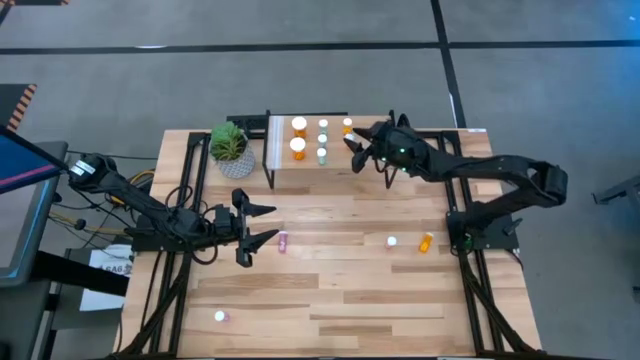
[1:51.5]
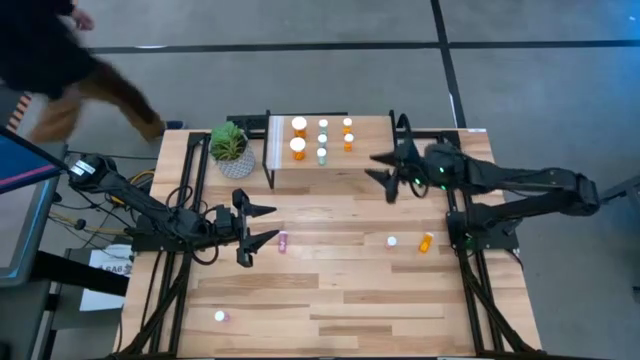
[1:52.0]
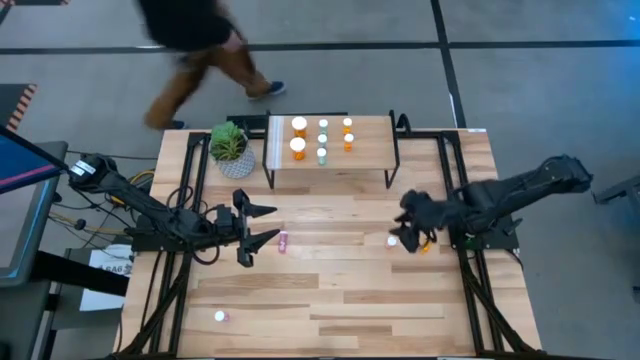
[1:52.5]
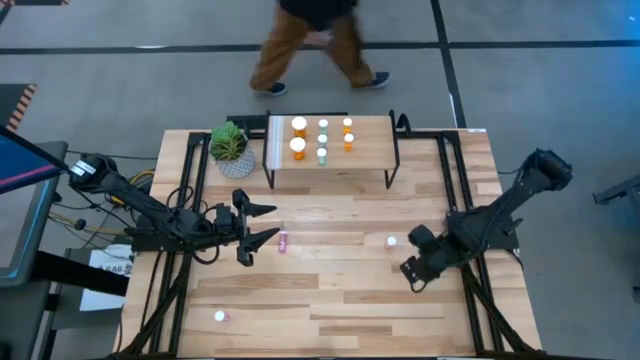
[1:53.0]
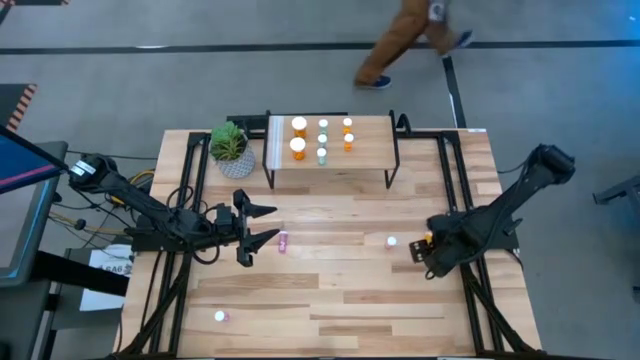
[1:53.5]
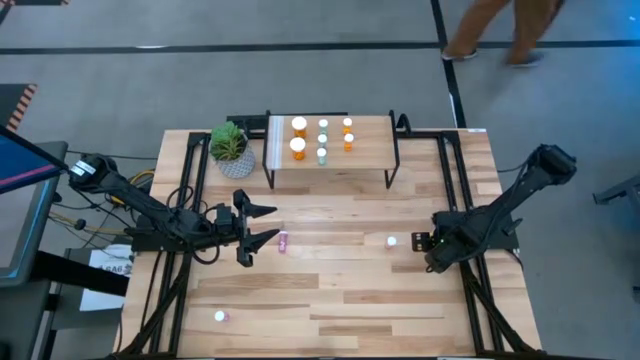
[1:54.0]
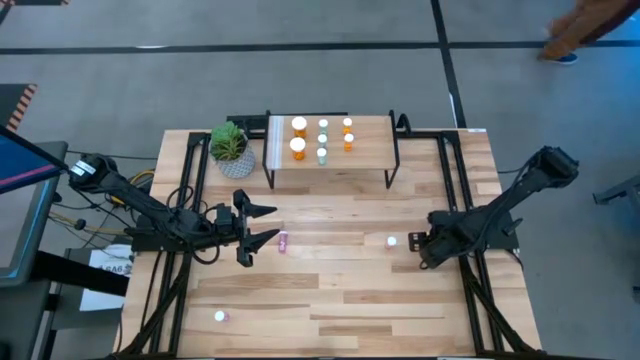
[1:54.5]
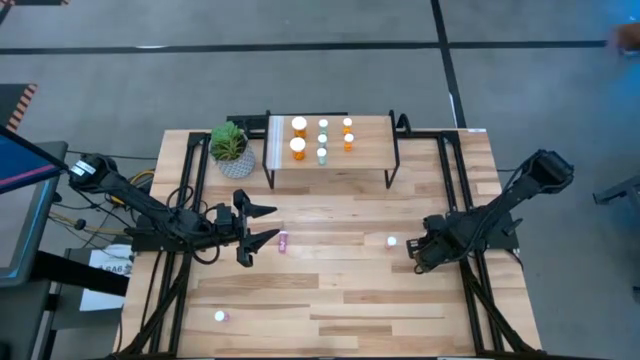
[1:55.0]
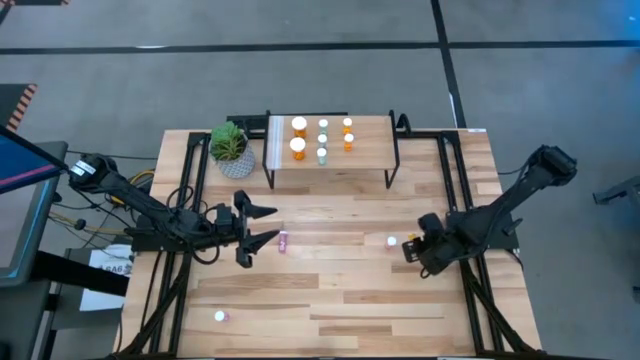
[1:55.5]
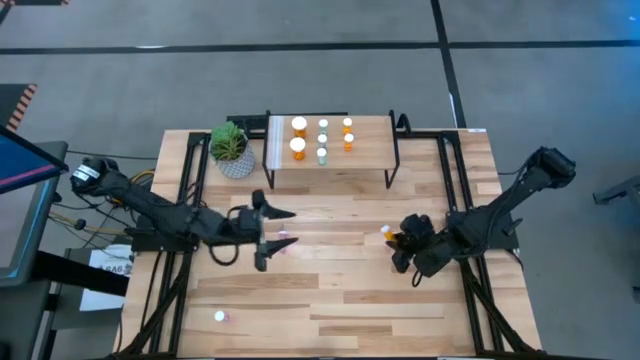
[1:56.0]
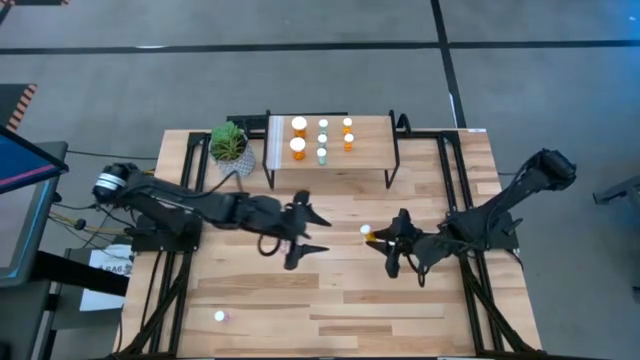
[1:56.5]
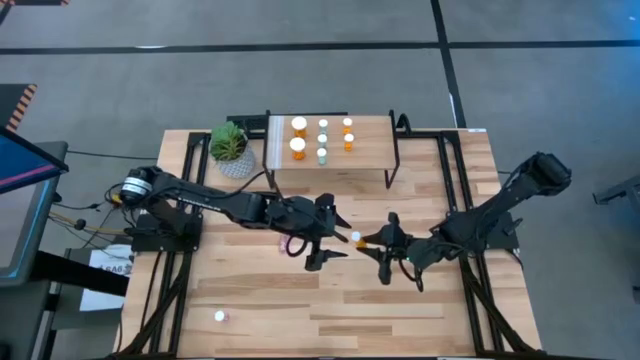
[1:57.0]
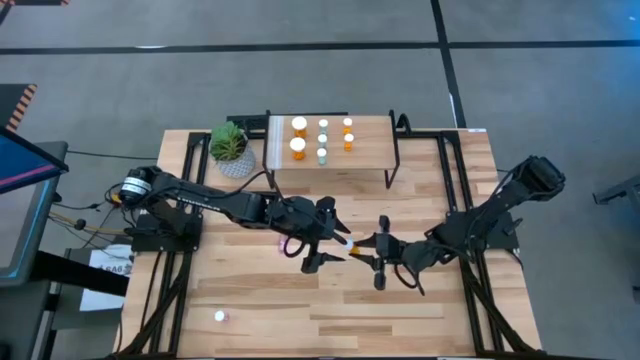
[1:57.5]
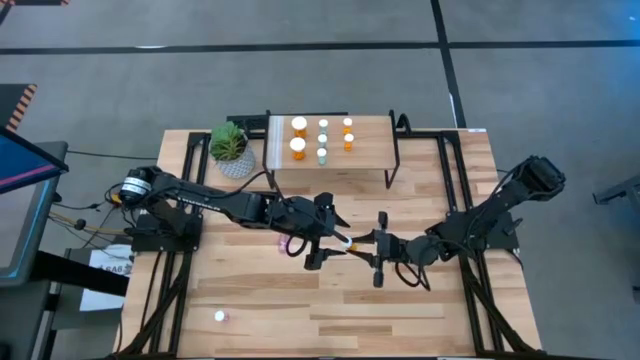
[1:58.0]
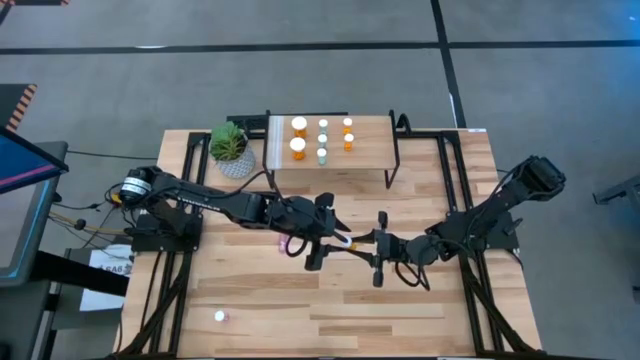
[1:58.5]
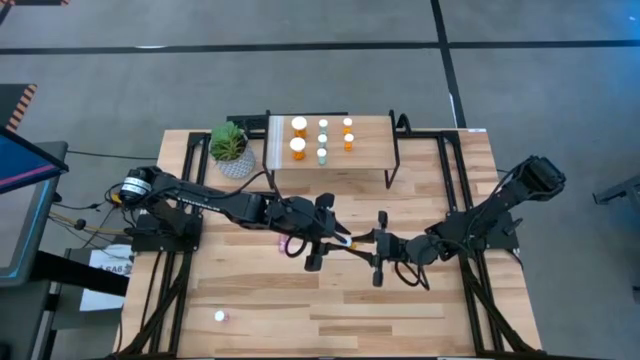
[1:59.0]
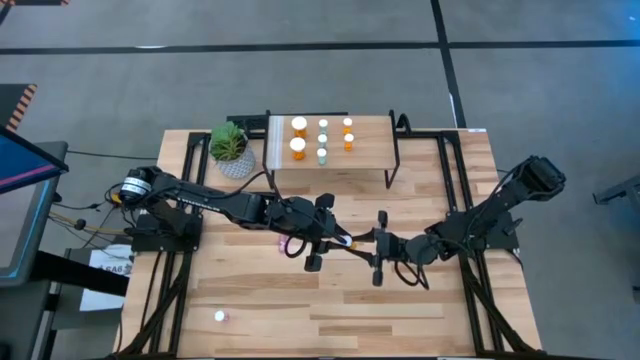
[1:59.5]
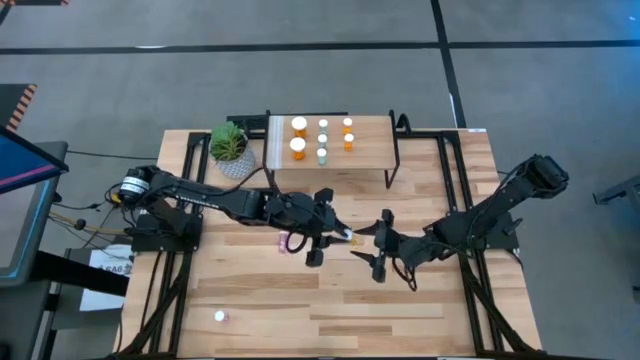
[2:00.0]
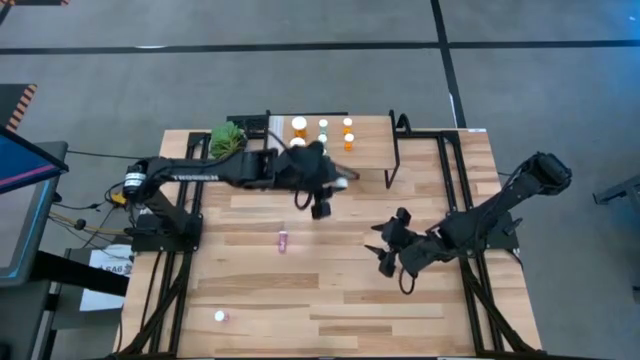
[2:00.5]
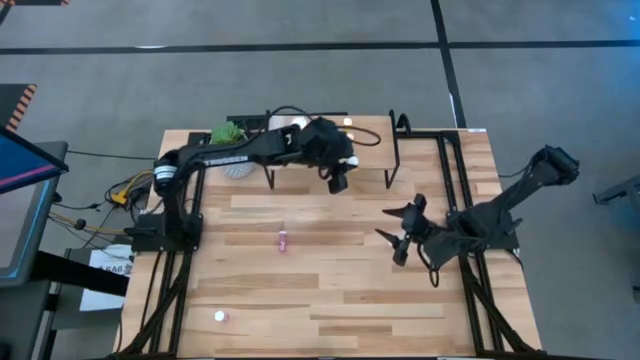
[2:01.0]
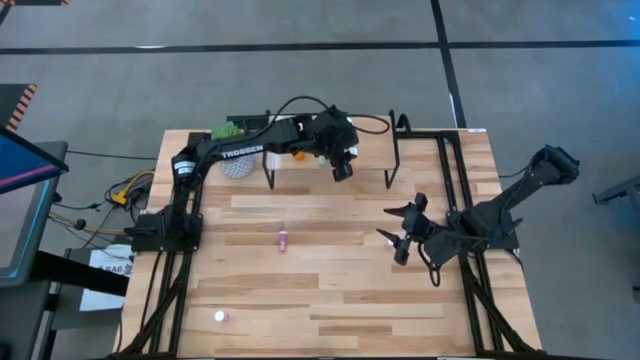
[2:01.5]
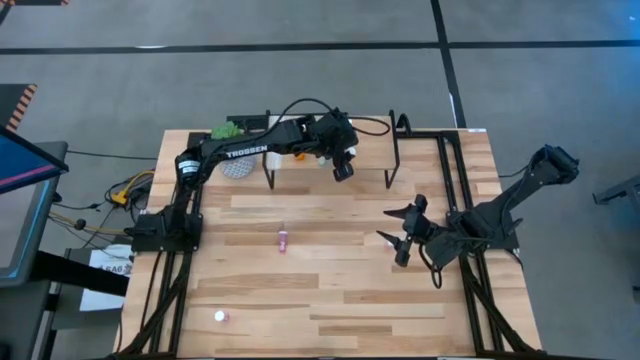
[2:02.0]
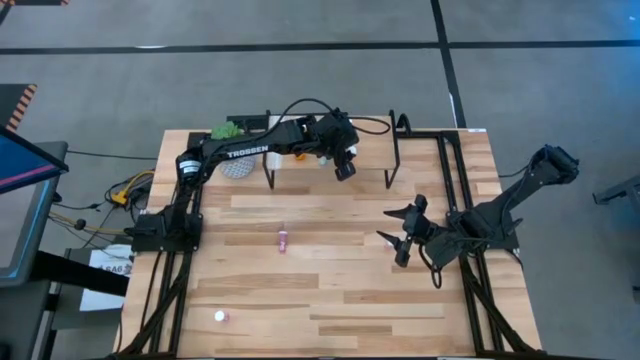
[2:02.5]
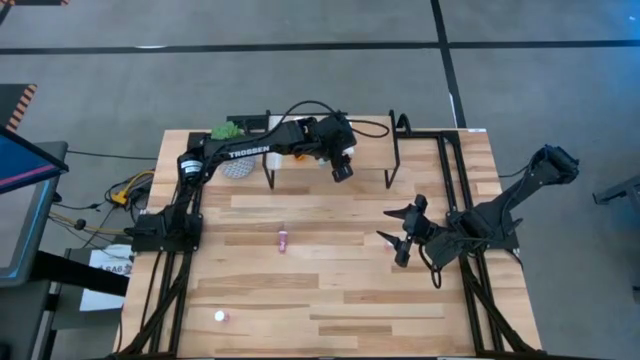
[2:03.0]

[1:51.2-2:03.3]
Task: Pick and place medicine bottles onto shelf by color
Put the small orange pill bottle on the shelf aligned with the other small orange pill bottles

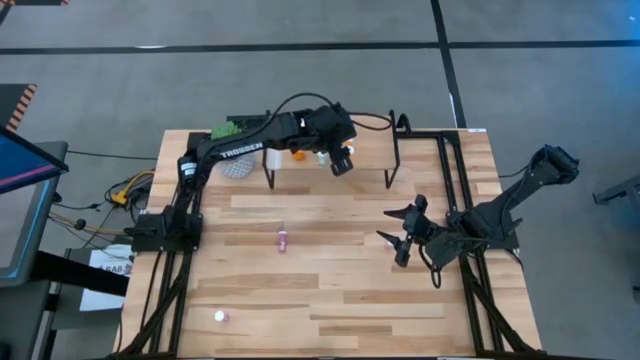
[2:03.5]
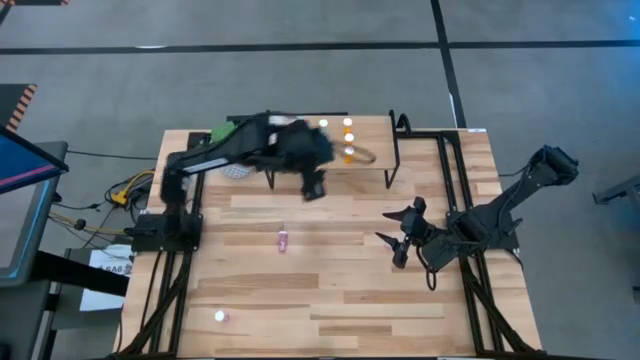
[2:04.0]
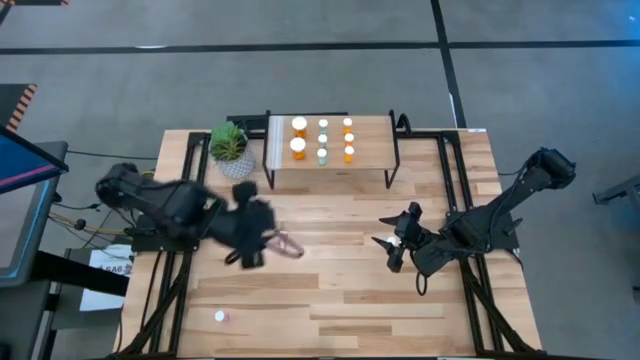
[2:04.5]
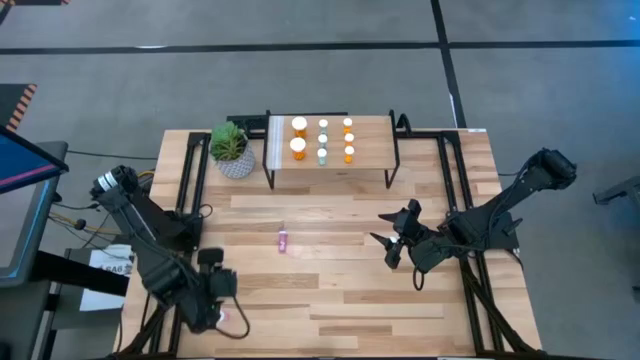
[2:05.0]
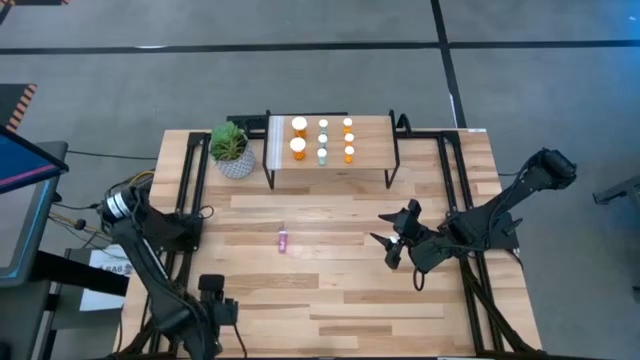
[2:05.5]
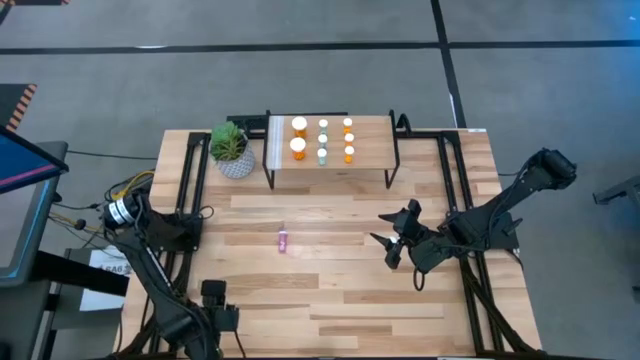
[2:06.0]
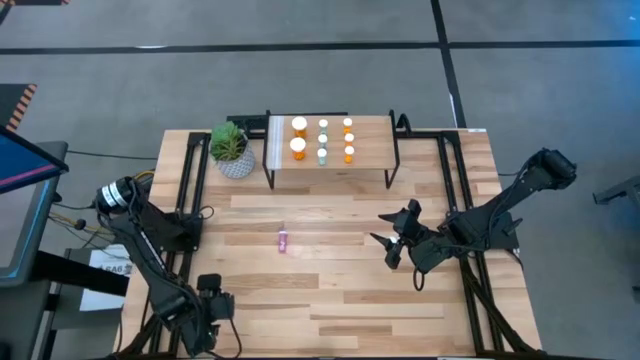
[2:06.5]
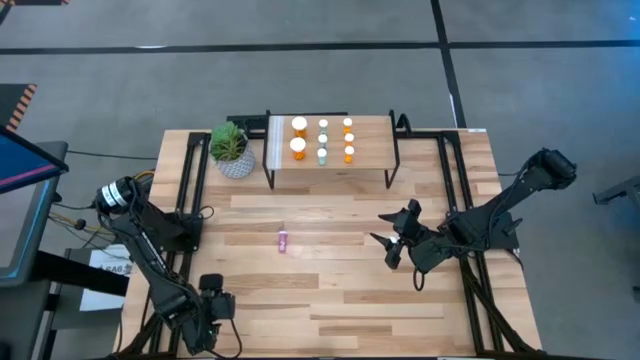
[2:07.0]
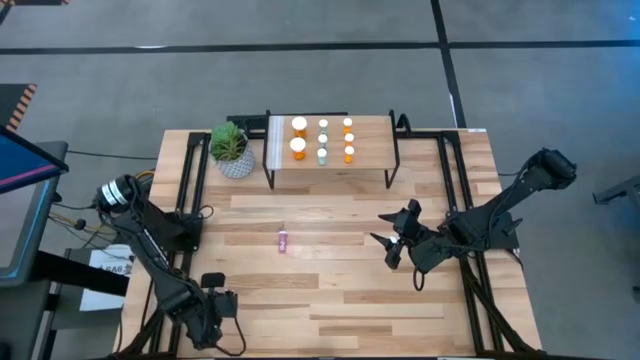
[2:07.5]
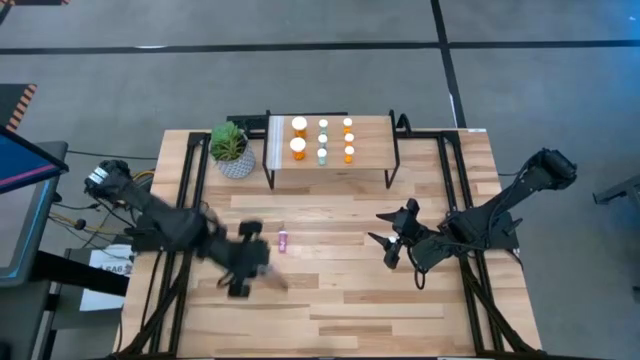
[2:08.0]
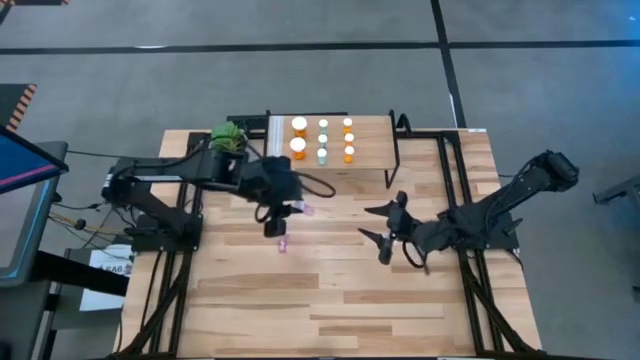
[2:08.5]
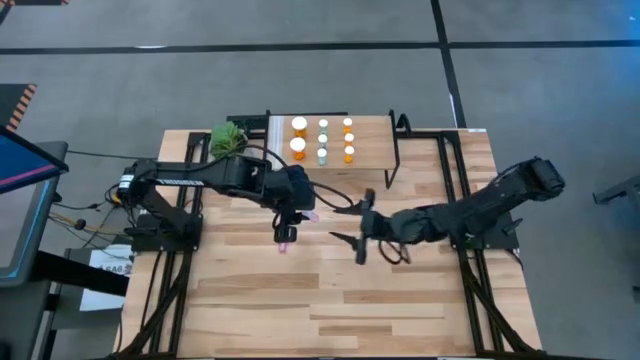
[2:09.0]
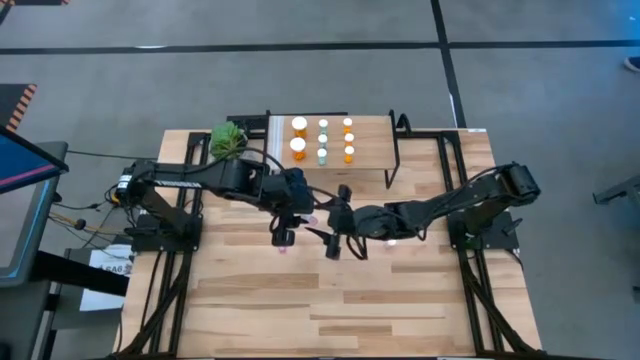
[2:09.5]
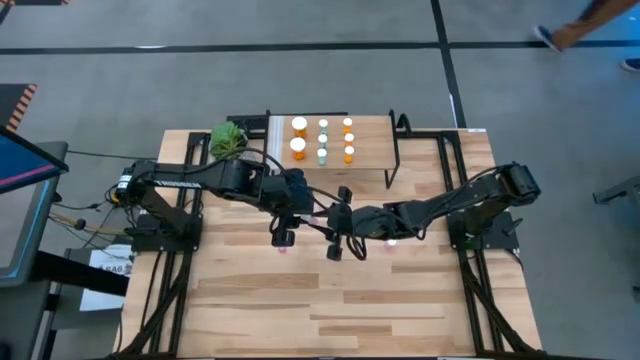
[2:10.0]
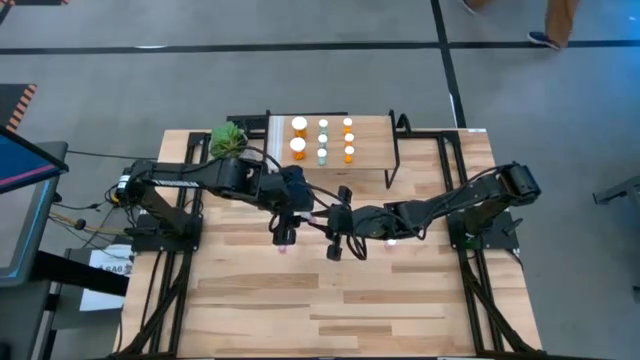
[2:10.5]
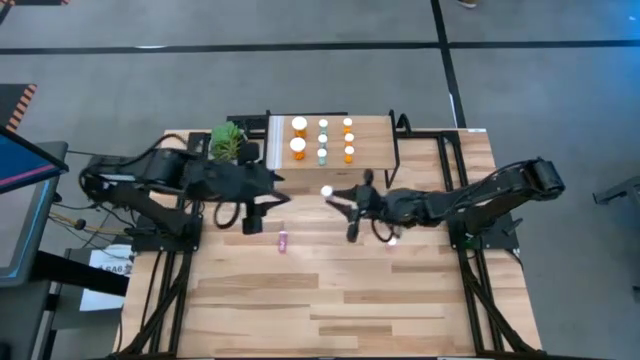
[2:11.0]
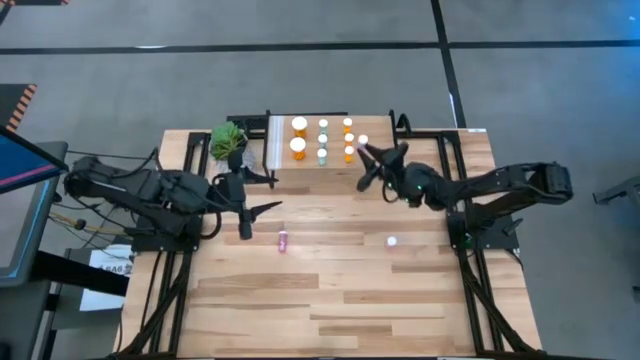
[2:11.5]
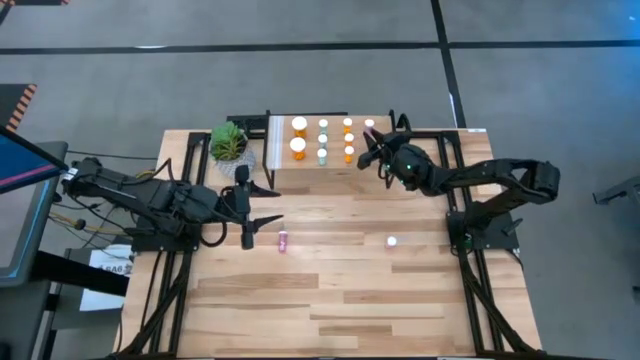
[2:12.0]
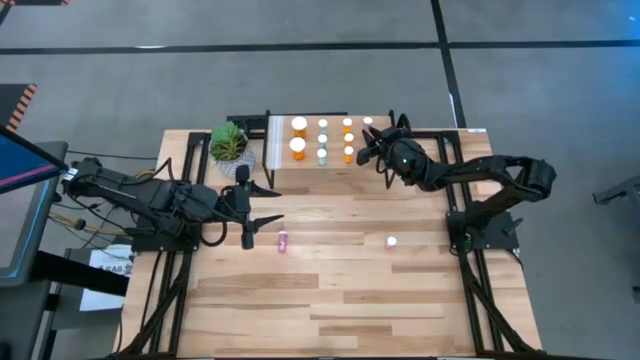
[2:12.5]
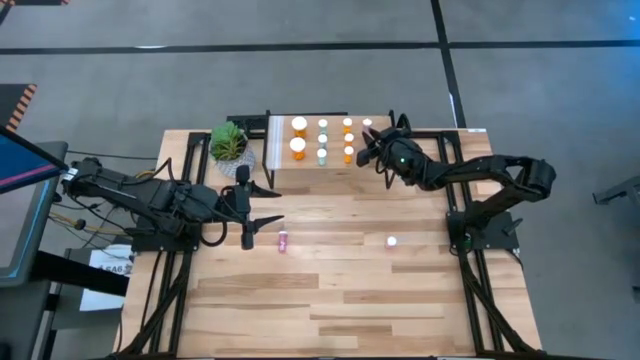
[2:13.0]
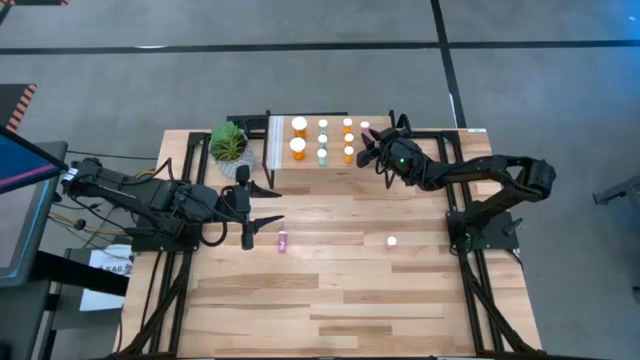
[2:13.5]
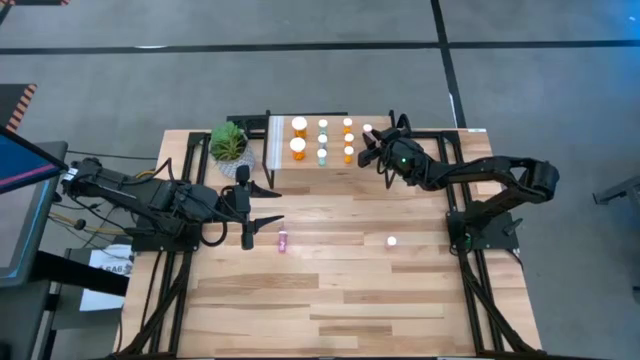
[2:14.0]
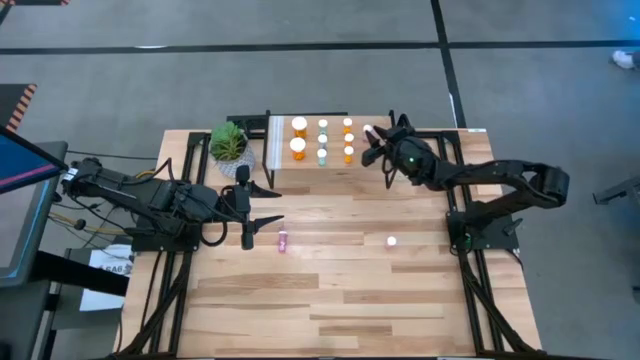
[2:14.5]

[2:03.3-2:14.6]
Put the pink pill bottle on the shelf
